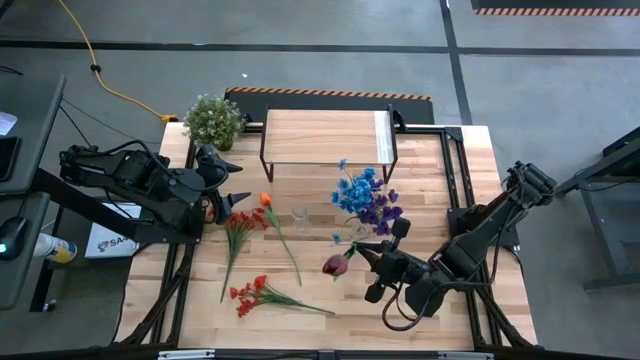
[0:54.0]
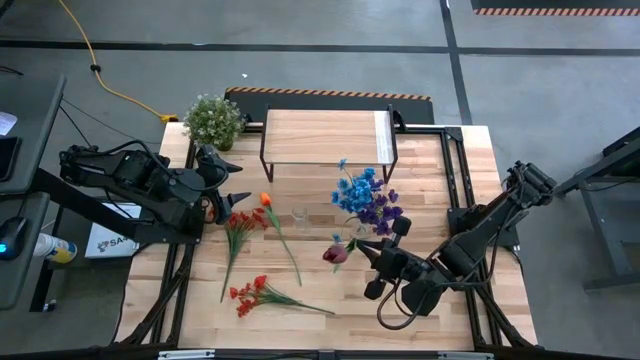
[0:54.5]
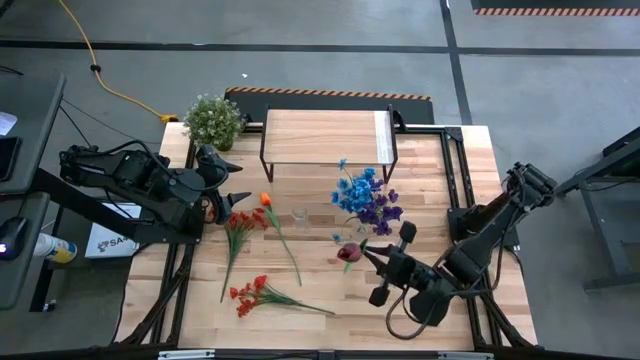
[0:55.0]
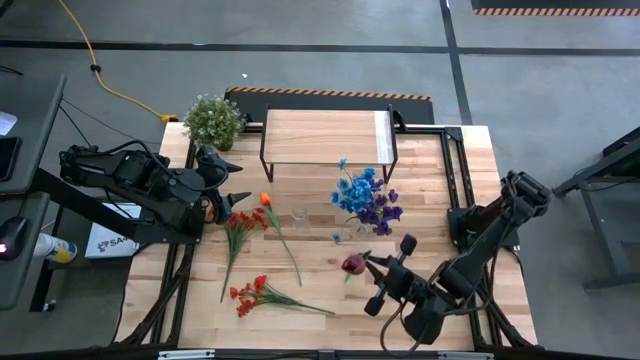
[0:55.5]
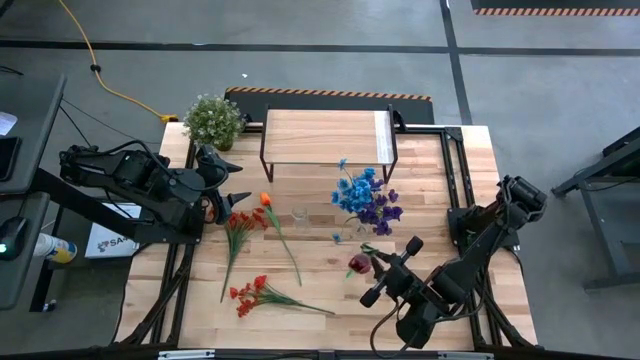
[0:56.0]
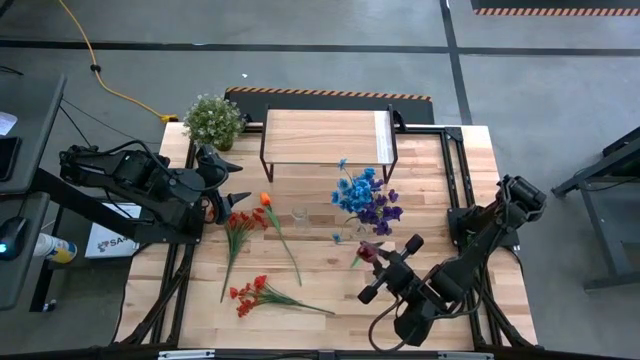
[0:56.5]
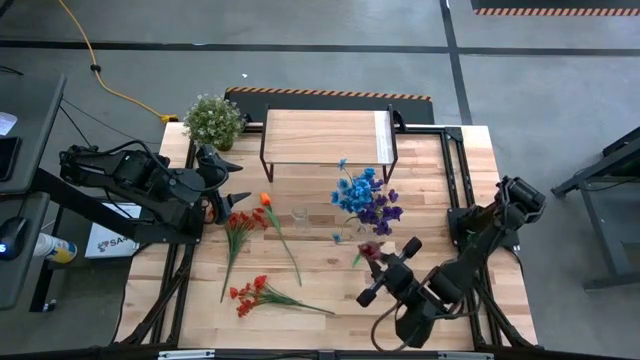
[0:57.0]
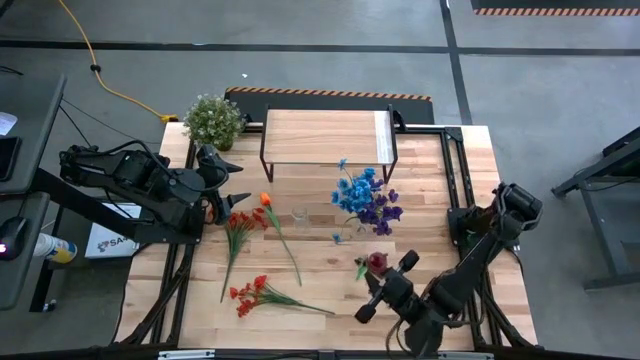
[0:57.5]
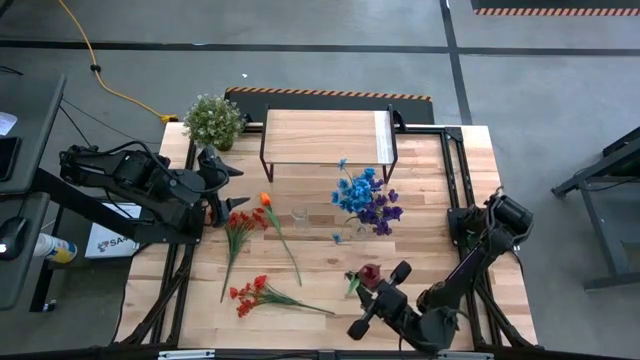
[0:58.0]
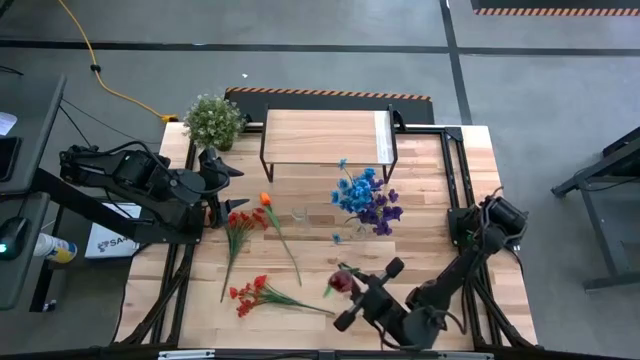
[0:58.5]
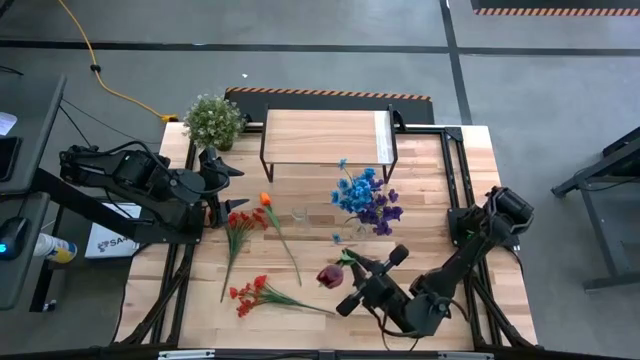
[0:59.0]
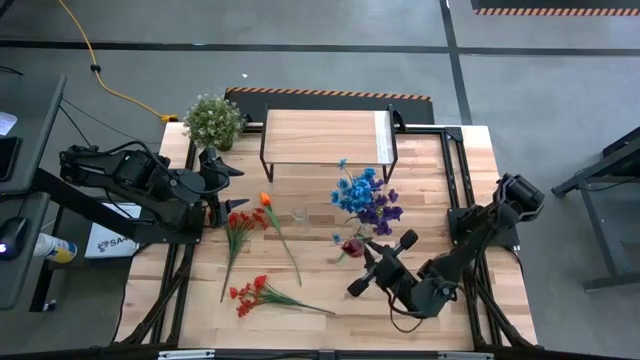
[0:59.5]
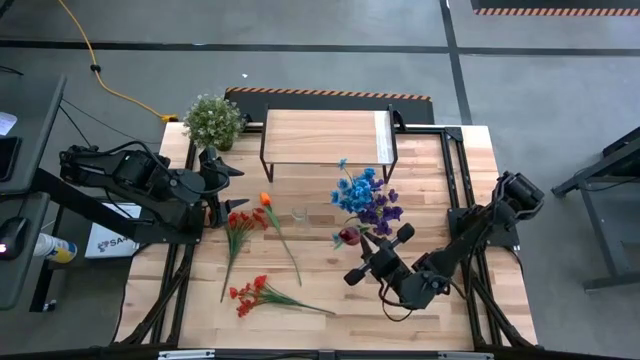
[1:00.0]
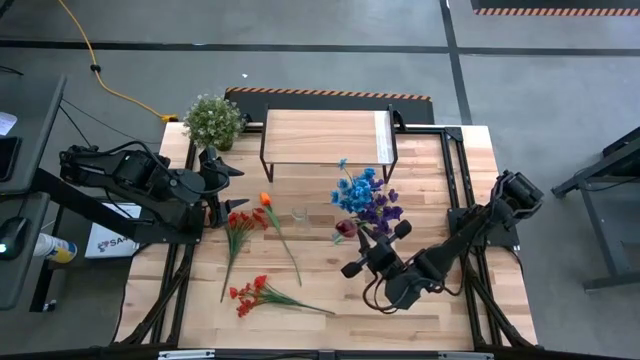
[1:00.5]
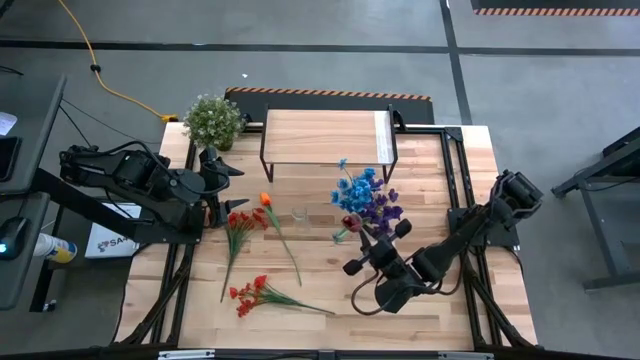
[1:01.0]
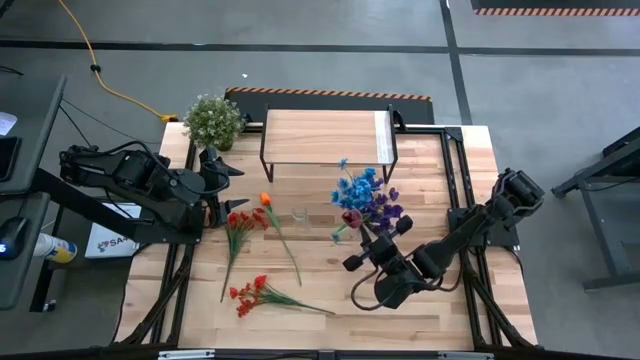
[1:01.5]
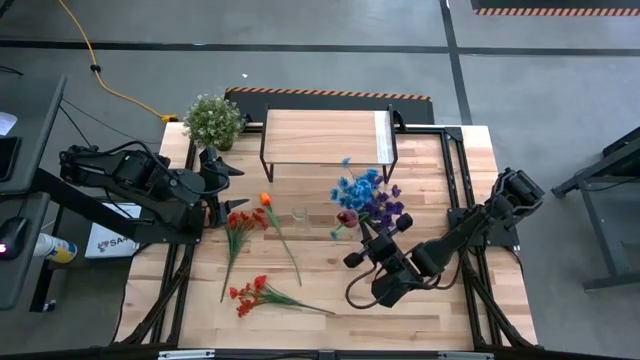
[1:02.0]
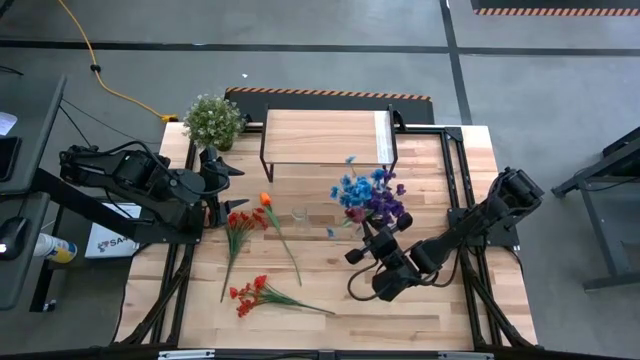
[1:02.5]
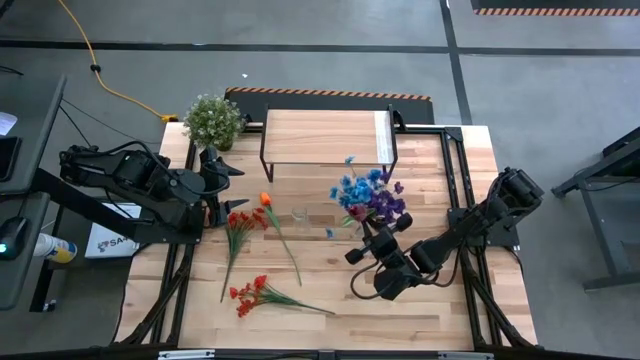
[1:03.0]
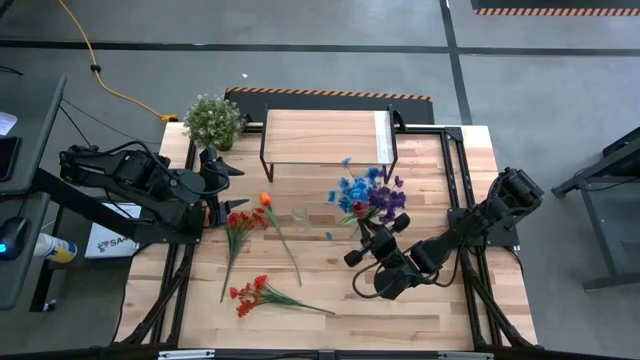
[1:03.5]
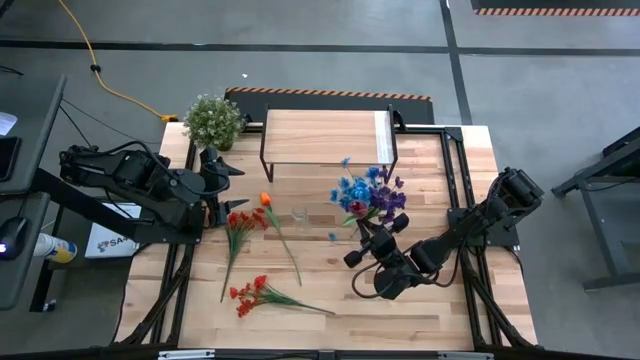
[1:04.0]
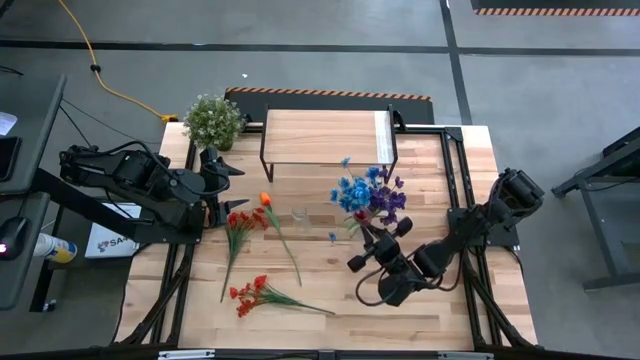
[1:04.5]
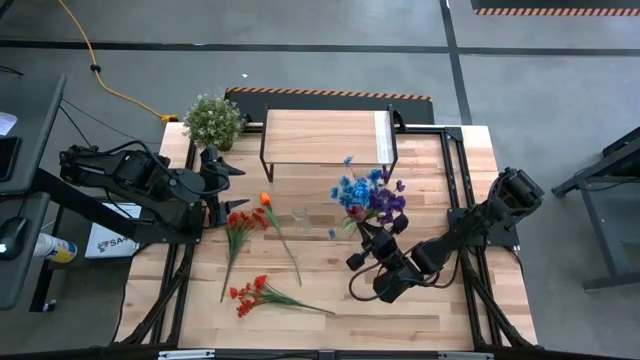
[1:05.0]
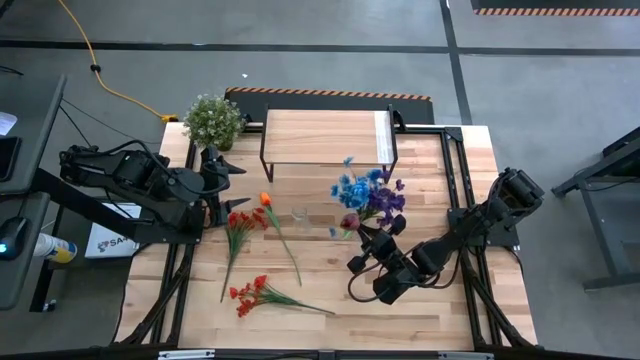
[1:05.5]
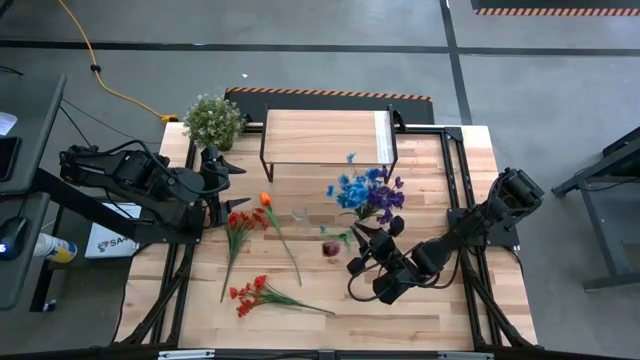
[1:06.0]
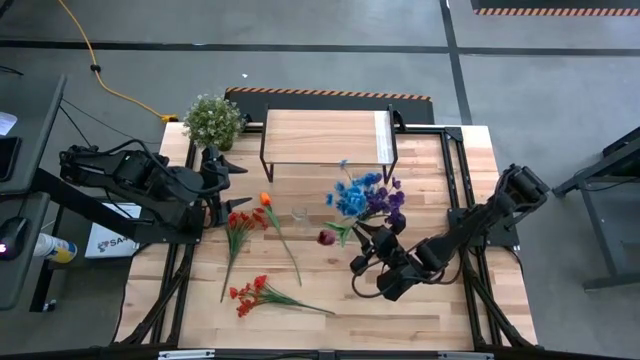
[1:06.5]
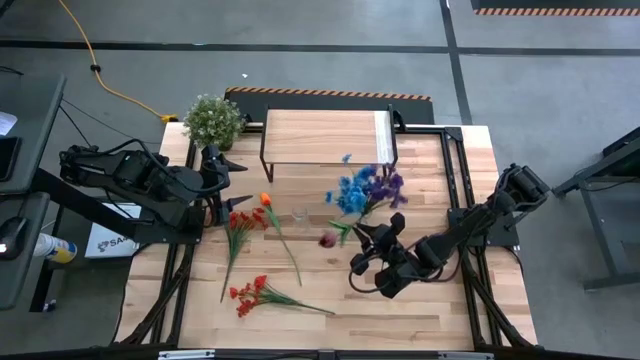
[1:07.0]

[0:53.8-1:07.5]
Task: Pick and place flowers into a vace then onto a shelf
Put the purple flower into the right transparent vase

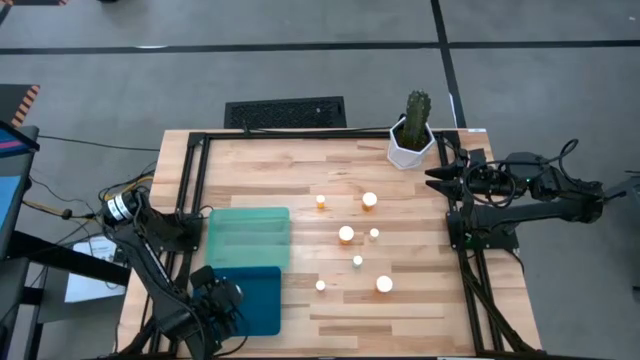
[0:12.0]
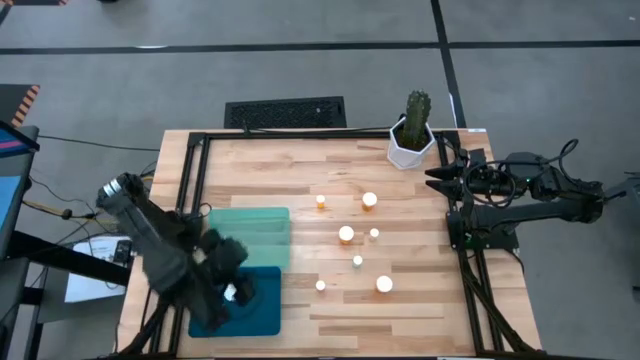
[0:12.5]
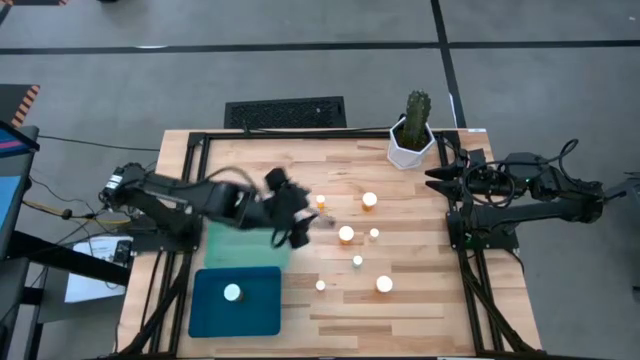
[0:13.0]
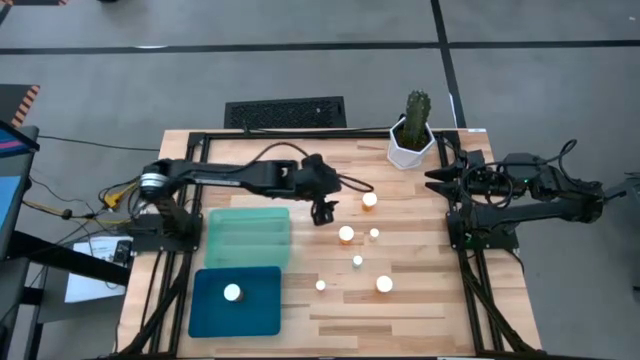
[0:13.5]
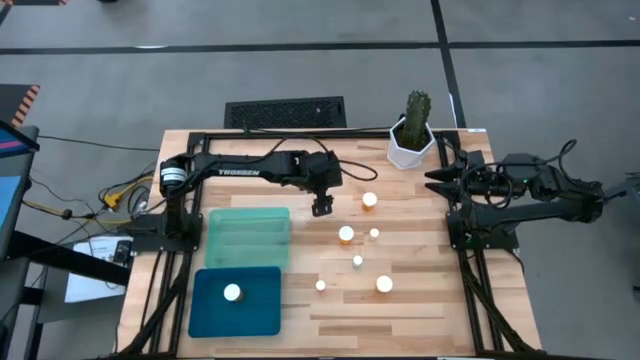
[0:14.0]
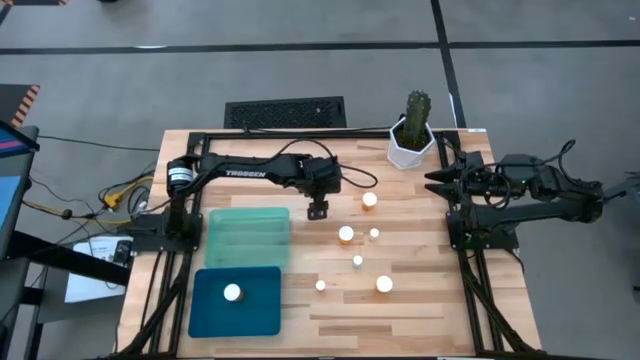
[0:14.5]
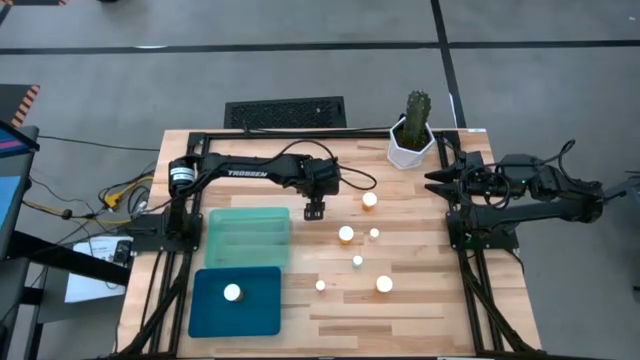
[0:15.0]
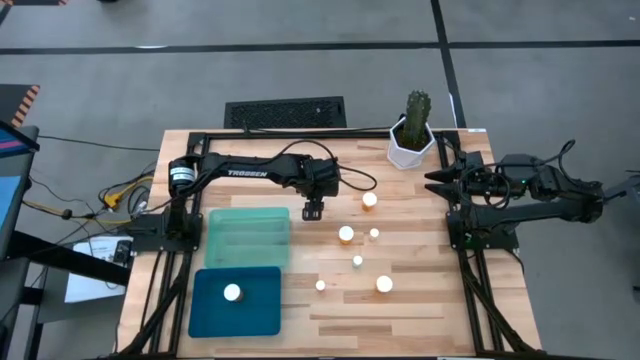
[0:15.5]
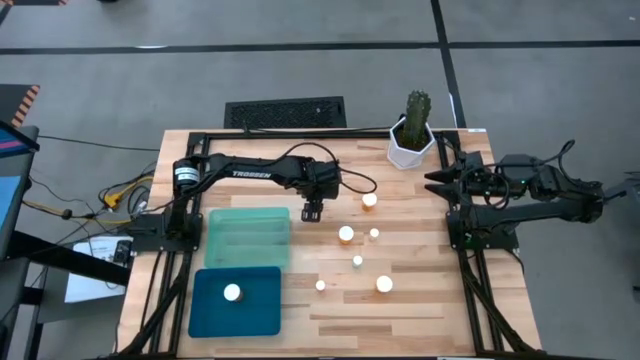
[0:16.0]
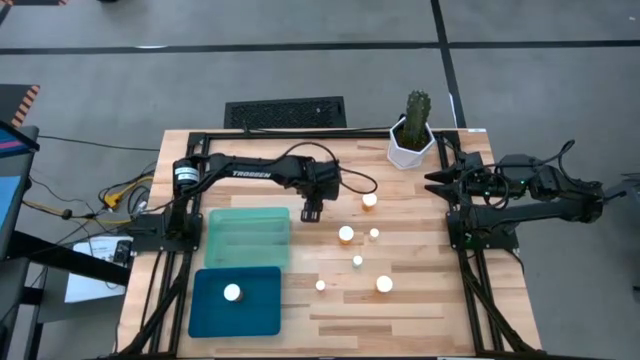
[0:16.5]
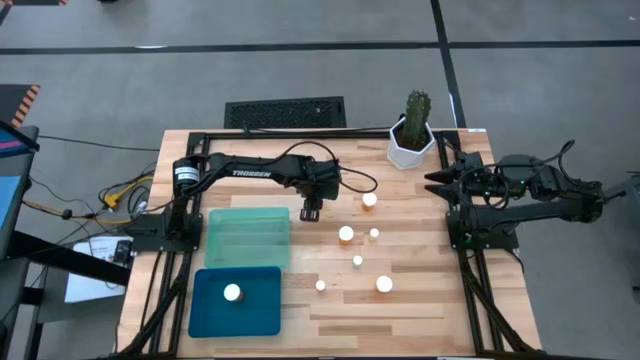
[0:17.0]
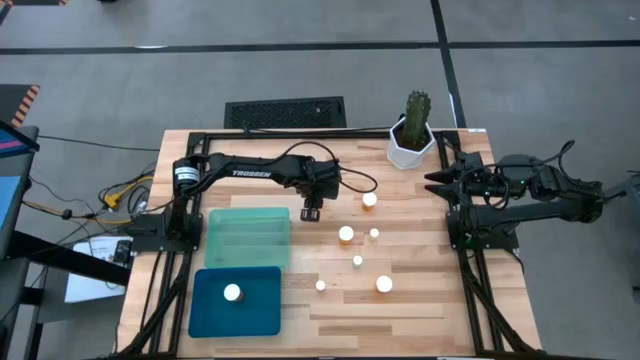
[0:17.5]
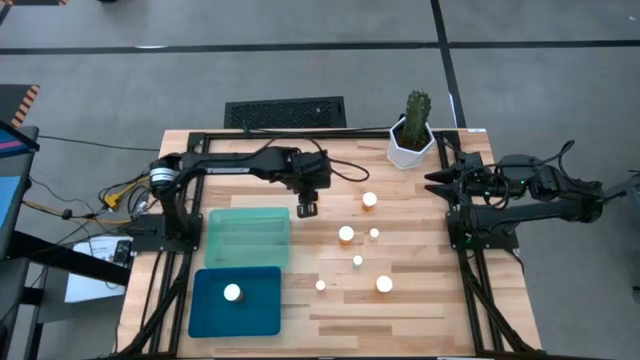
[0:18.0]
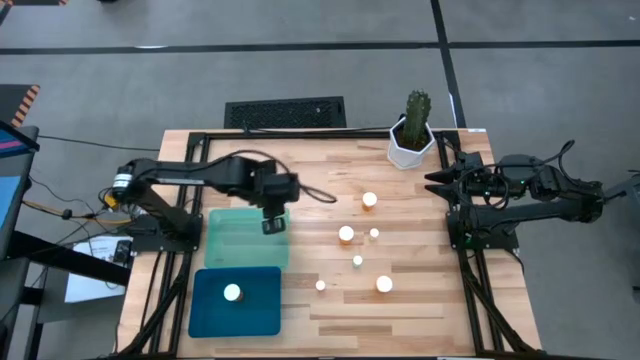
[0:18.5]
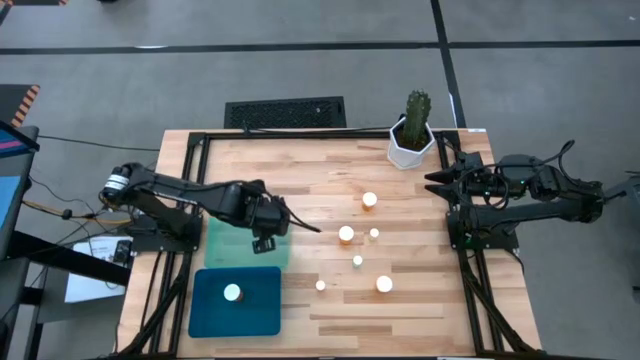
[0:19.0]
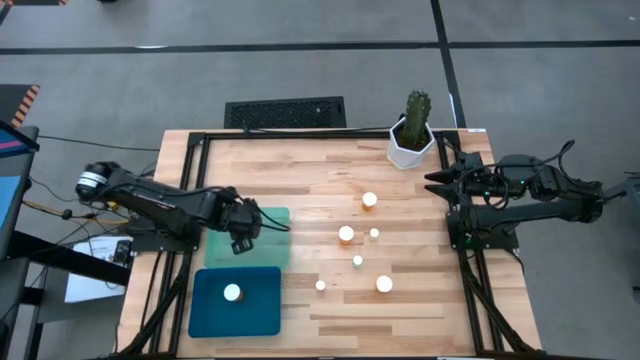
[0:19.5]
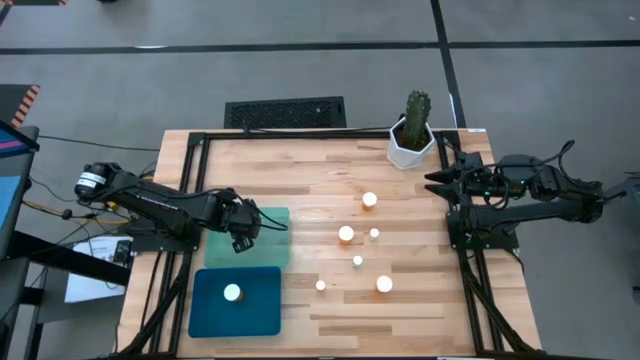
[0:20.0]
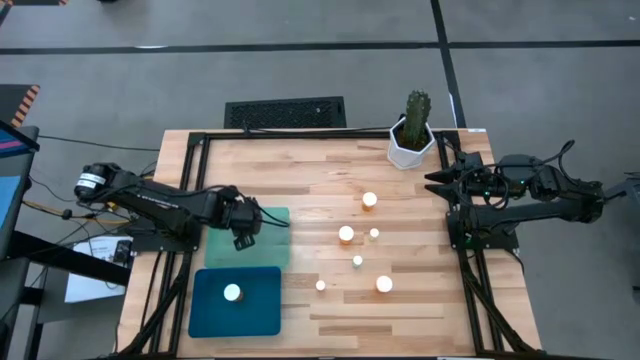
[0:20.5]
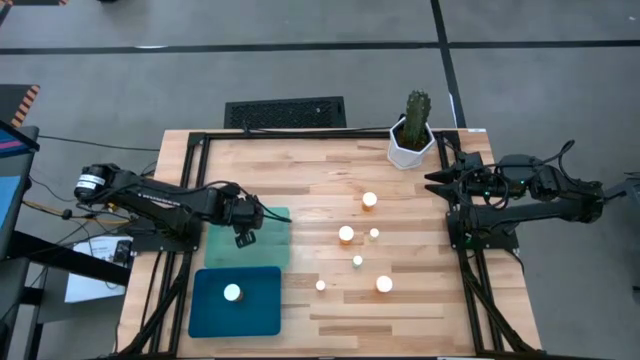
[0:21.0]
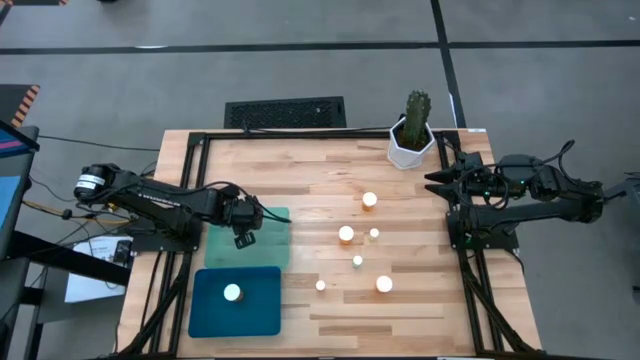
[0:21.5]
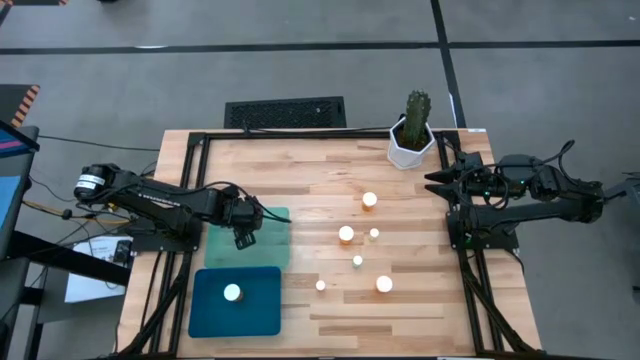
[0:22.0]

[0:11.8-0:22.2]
Task: Pick and place medicine bottles into bin by pill shape (circle, oval)
Put the small orange pill bottle into the green bin
